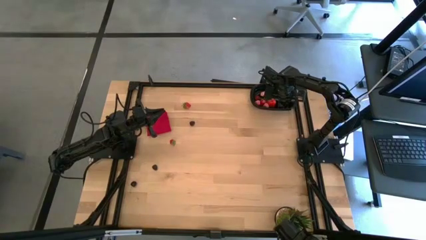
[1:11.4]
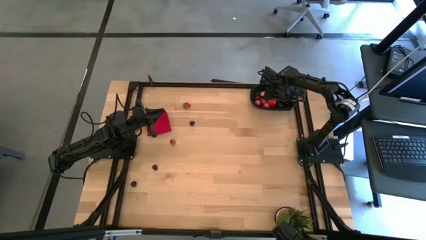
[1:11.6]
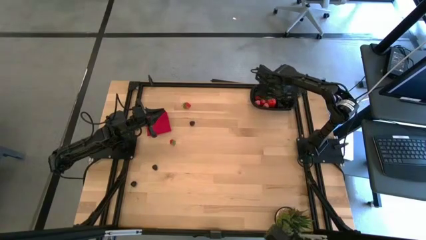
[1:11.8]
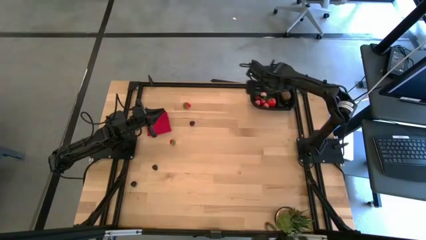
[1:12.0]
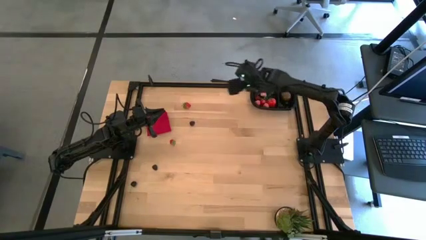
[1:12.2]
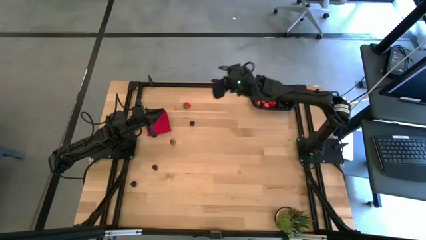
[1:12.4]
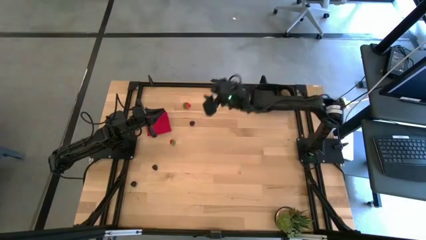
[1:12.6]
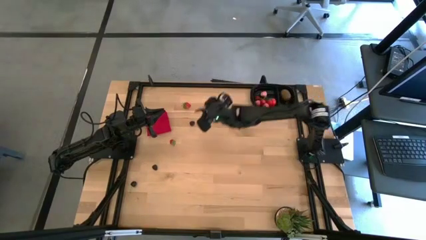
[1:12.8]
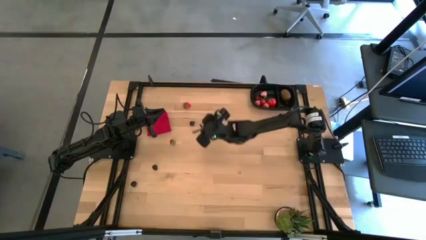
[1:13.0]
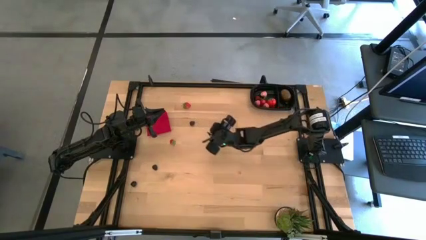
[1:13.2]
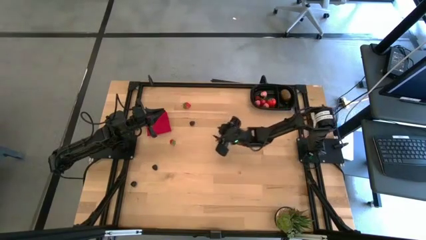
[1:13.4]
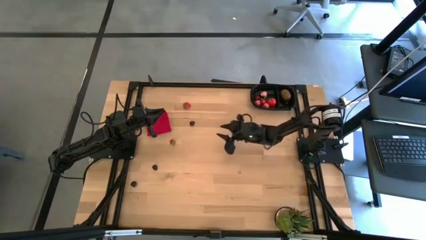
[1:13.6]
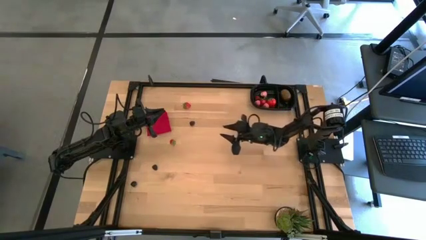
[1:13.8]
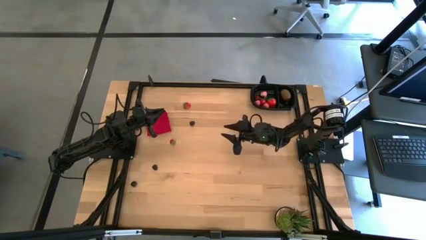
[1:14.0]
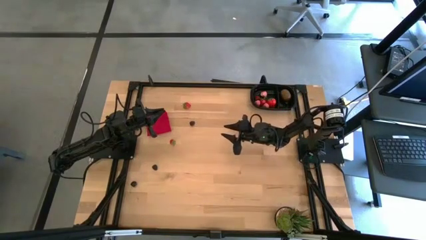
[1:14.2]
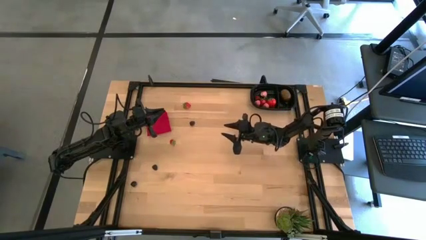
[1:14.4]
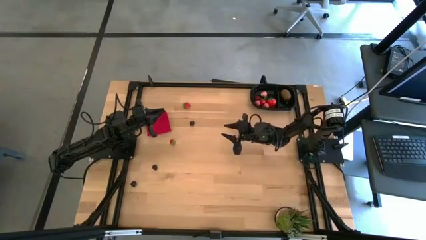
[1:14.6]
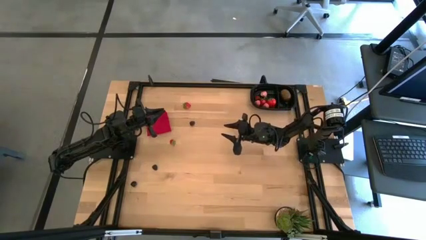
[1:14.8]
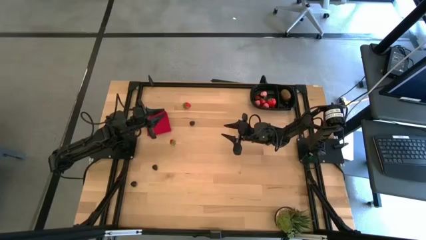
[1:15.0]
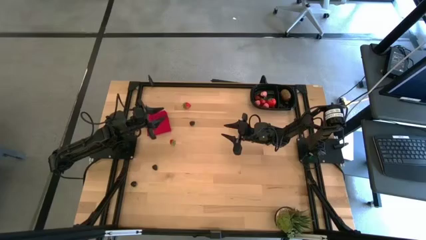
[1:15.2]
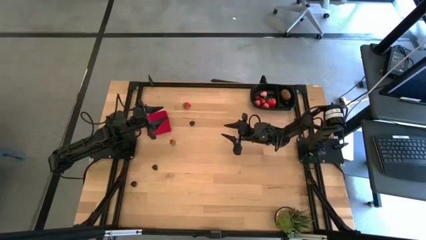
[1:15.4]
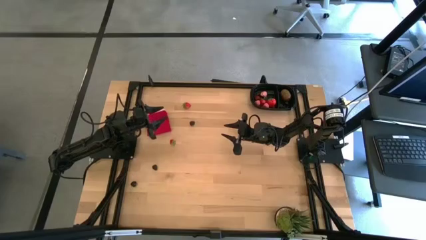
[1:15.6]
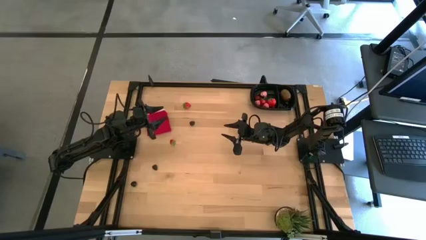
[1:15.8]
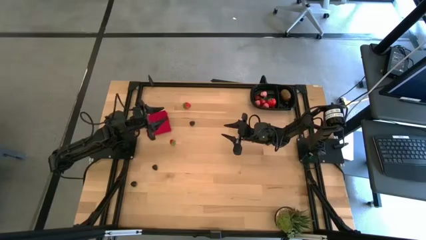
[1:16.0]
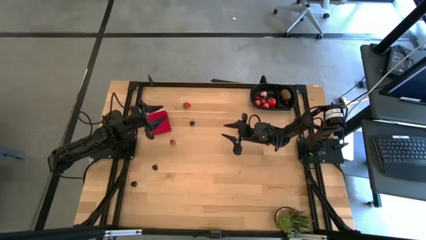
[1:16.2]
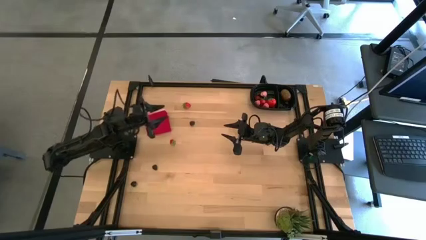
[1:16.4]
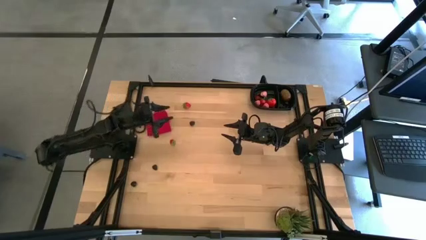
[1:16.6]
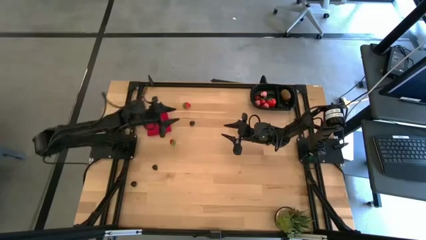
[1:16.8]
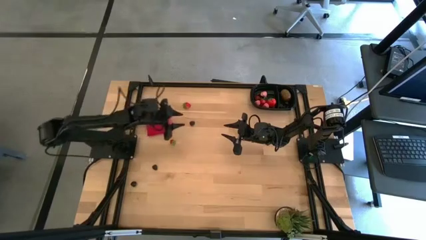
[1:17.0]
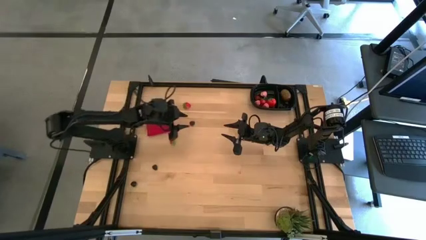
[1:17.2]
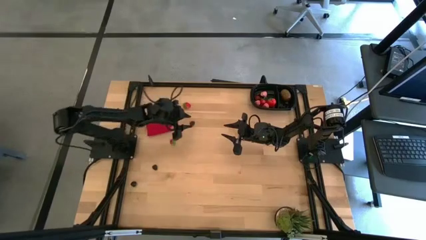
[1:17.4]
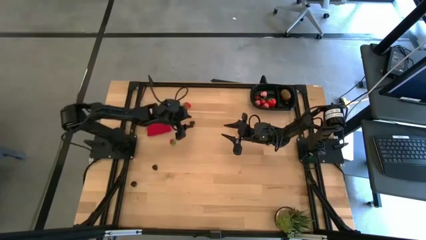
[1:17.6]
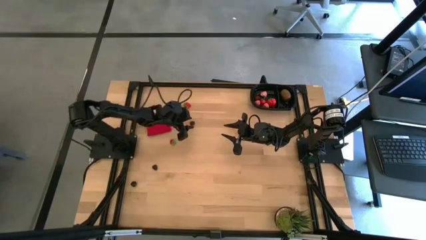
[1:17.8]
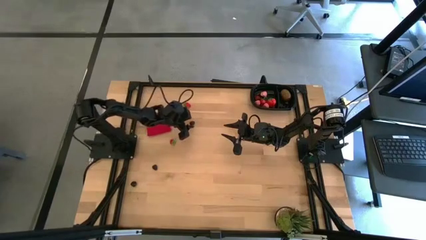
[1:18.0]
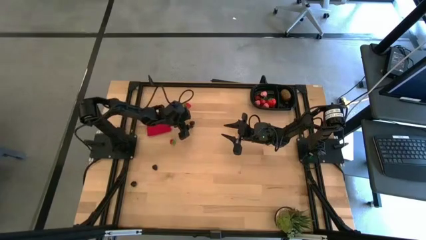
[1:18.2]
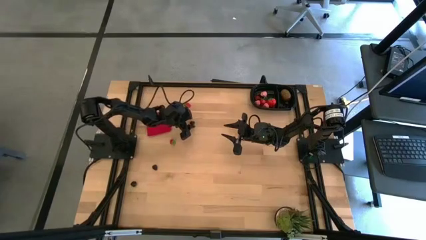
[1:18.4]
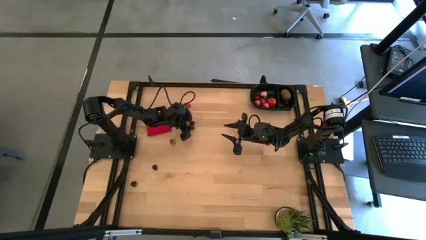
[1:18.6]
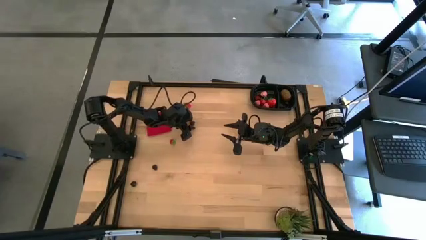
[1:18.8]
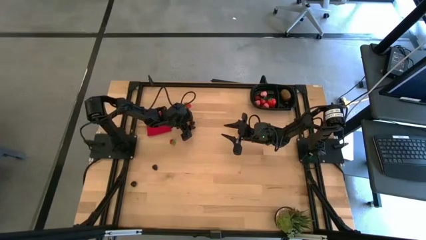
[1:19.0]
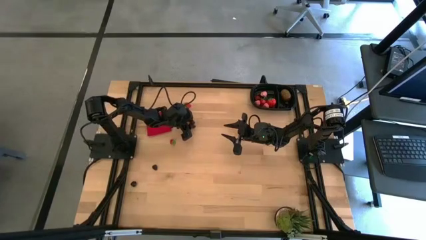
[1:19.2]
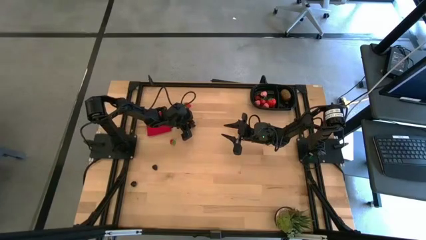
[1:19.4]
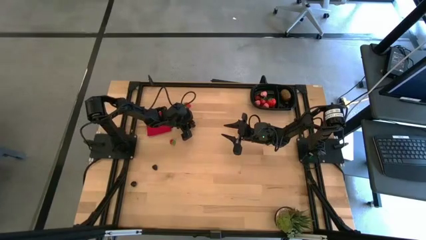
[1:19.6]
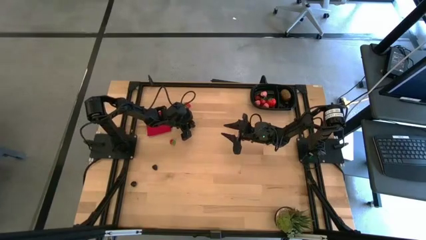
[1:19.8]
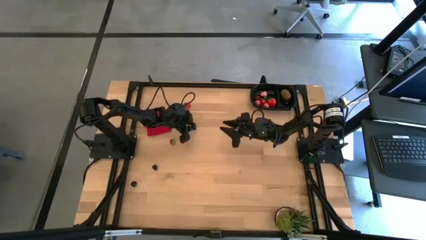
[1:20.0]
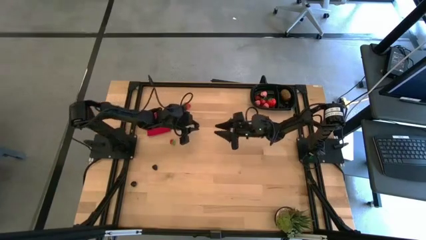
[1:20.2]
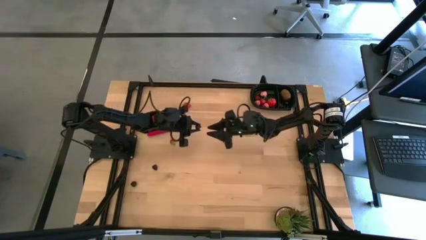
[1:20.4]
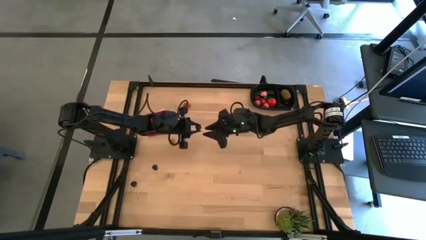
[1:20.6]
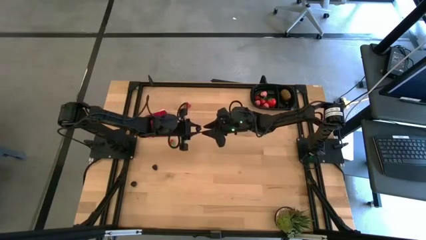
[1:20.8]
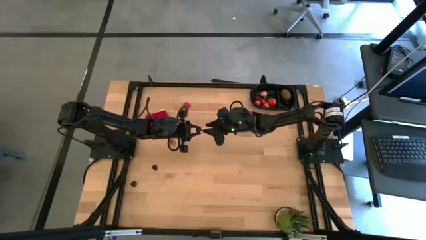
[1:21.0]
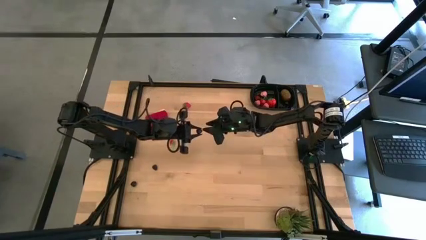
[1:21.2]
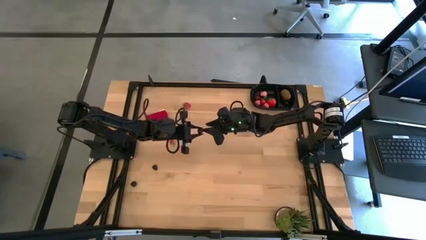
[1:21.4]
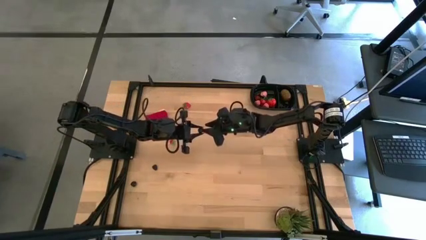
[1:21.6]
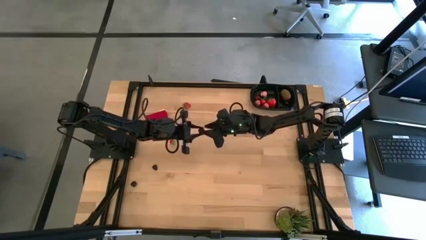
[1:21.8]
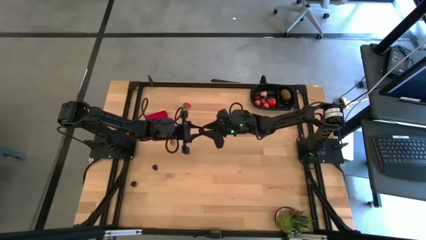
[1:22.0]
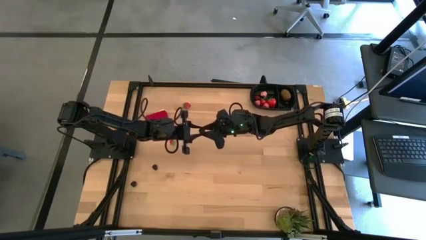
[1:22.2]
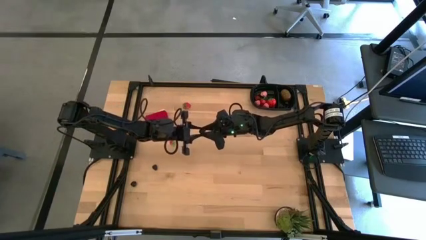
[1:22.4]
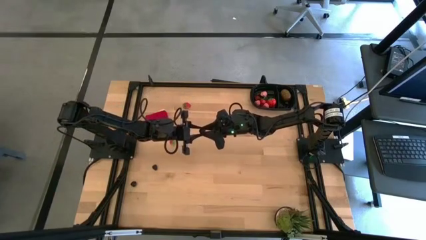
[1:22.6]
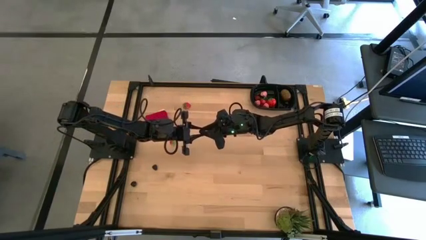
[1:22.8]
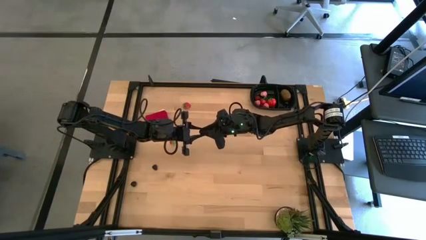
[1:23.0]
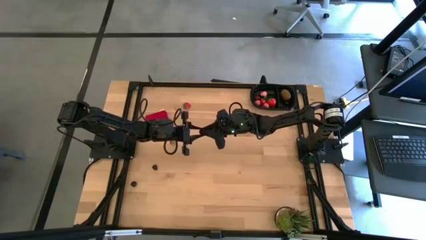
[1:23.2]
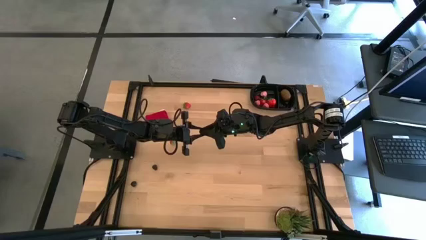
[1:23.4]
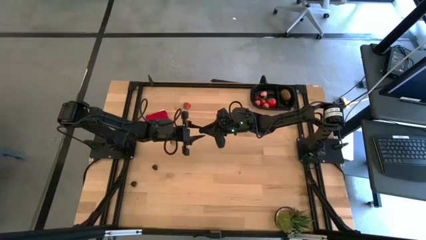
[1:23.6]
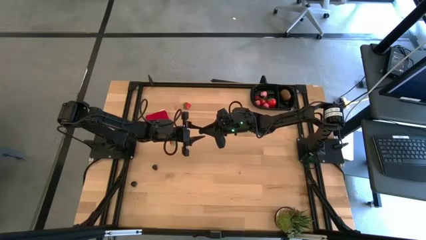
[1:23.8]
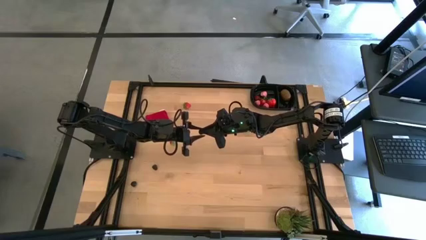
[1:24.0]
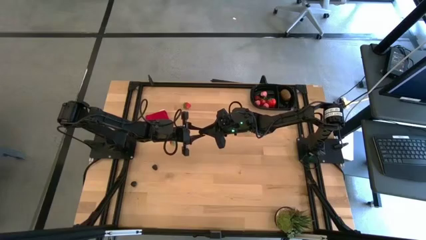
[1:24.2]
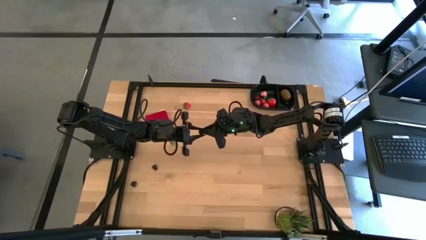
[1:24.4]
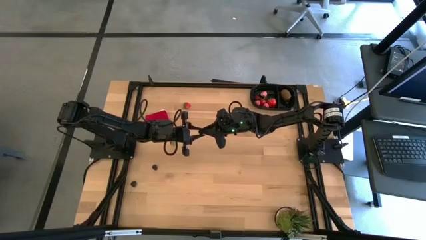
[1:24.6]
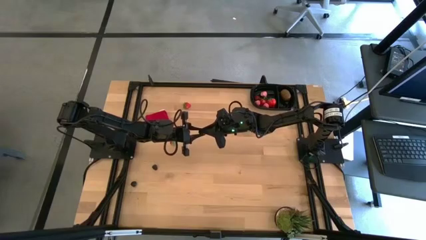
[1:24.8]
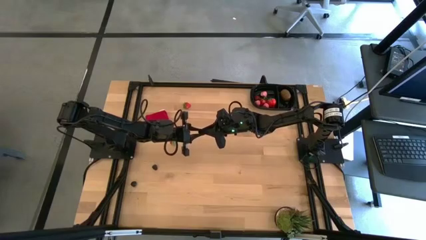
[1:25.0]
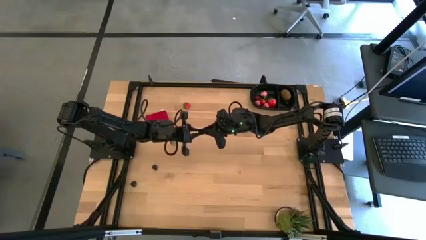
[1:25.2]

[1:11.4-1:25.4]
Task: Pick and placing Produce into tupperware
Put the black raspberry into the black bin

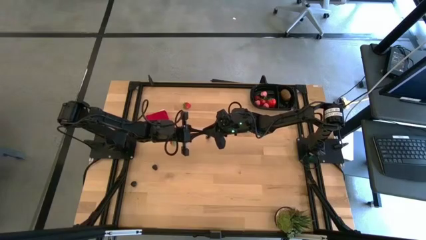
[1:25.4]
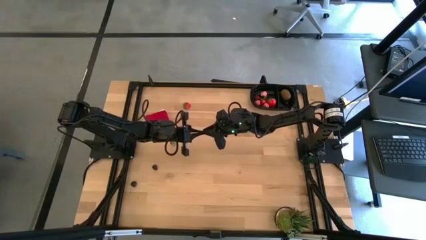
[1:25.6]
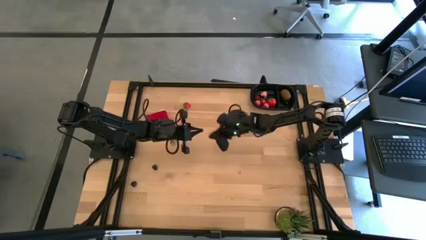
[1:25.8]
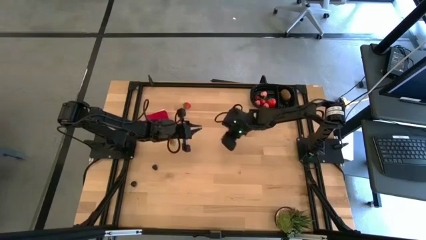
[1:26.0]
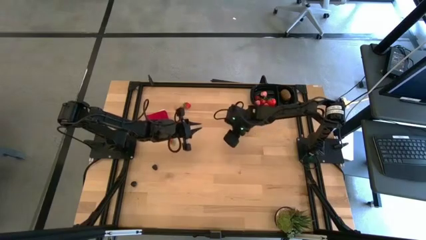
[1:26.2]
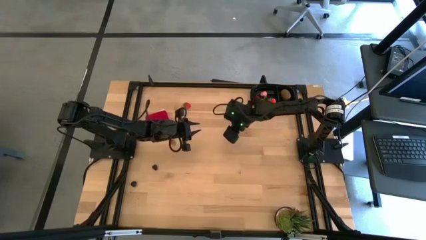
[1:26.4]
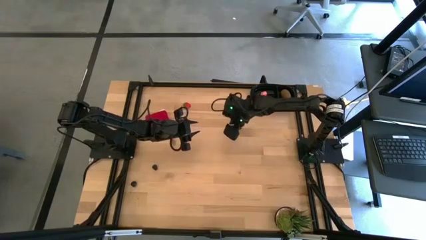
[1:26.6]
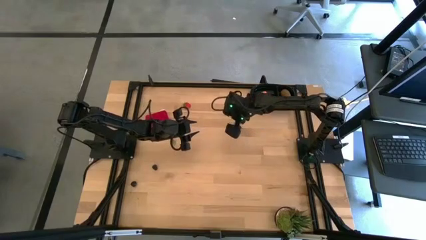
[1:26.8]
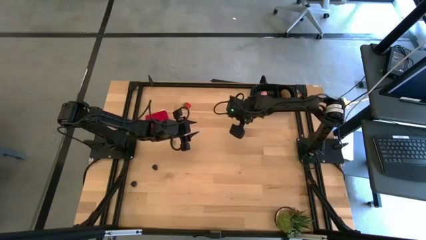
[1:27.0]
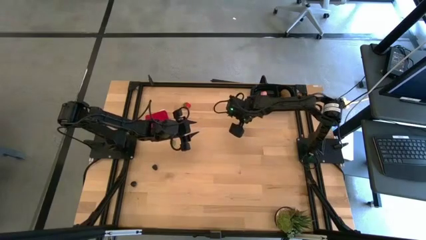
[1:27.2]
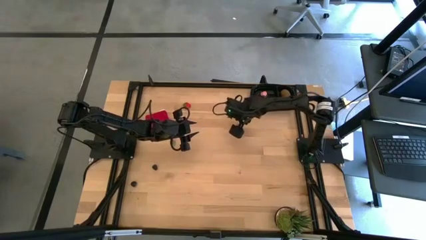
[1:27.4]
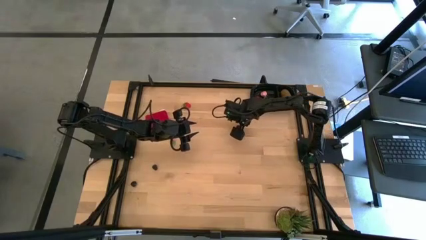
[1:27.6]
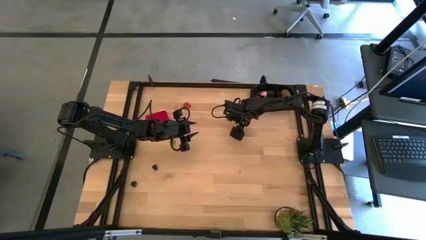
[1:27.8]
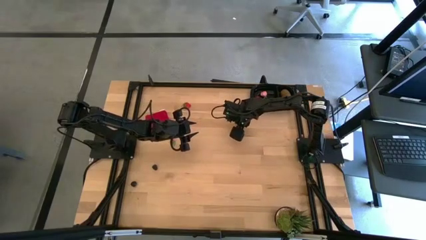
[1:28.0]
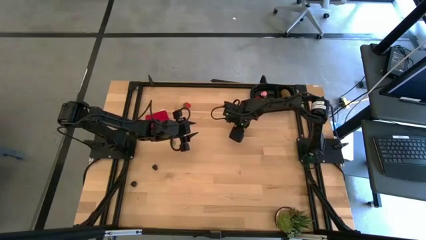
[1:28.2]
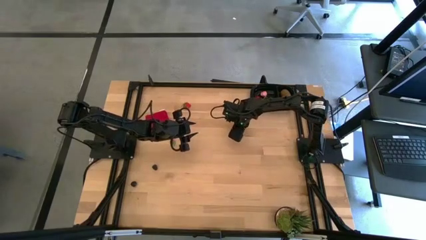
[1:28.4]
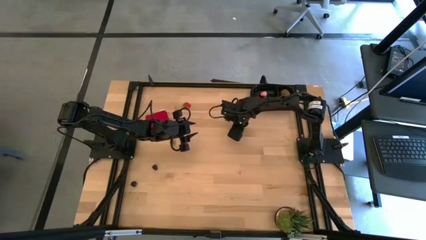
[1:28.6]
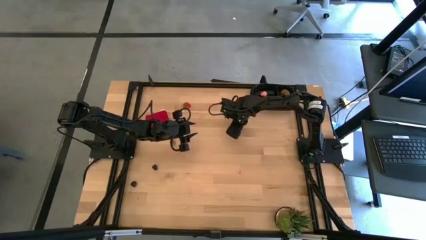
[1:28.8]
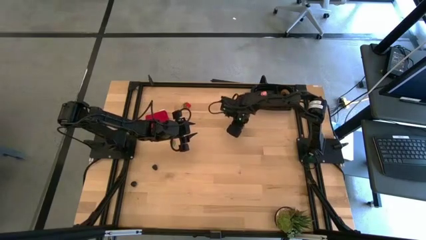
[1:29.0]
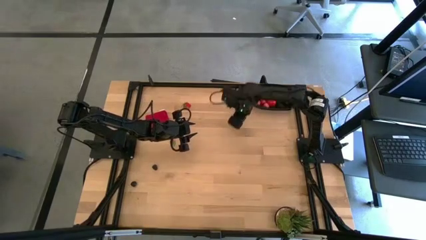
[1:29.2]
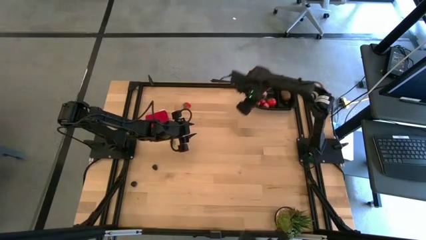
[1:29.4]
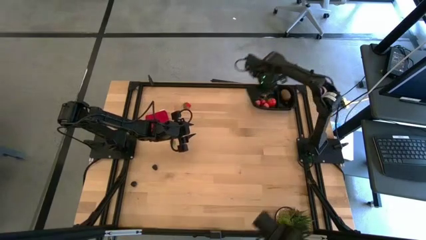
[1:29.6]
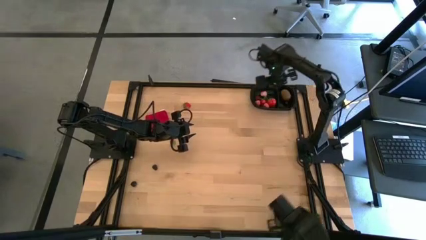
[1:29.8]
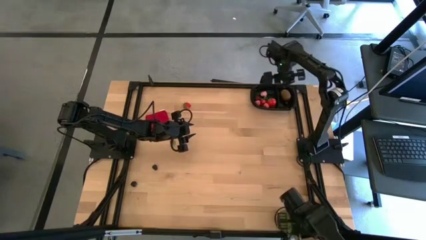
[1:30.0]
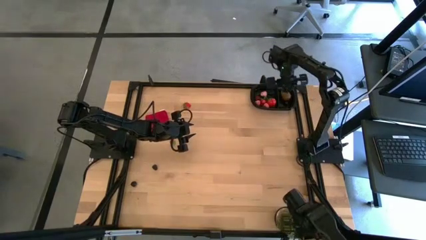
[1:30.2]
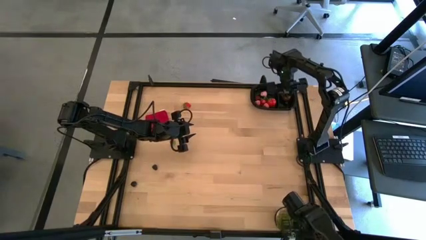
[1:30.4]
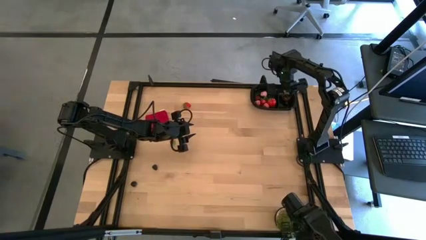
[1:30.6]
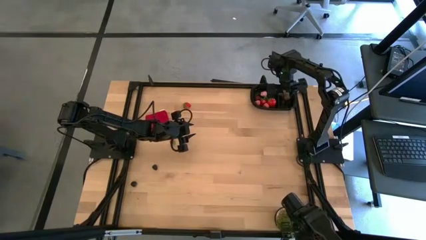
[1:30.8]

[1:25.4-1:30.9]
Put the black raspberry into the black bin
